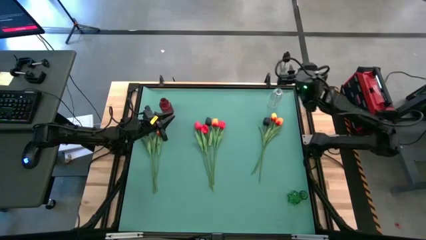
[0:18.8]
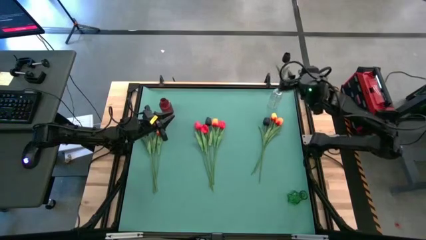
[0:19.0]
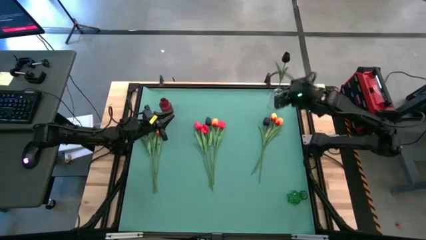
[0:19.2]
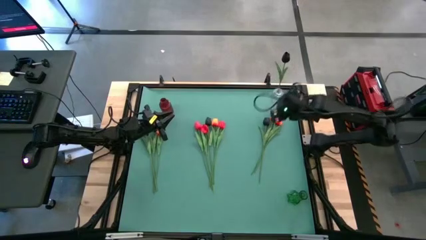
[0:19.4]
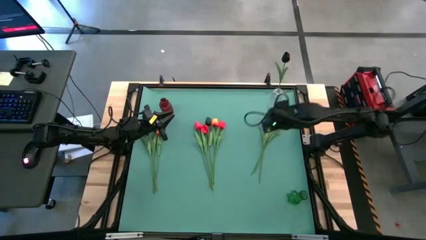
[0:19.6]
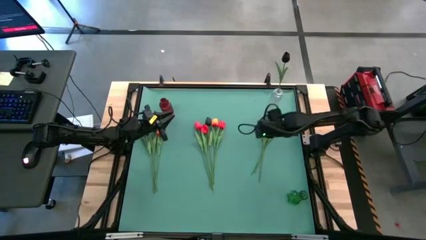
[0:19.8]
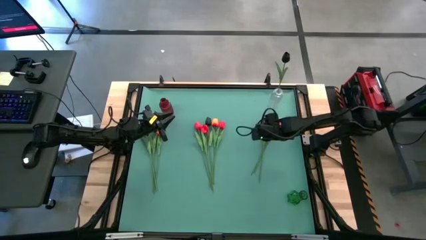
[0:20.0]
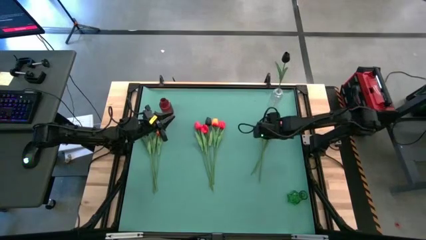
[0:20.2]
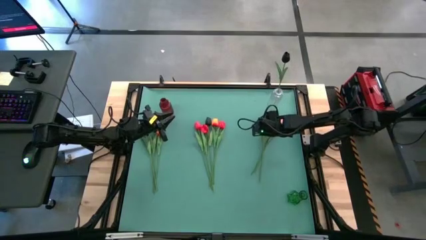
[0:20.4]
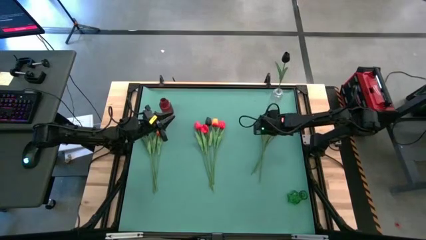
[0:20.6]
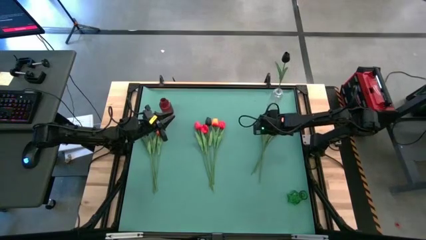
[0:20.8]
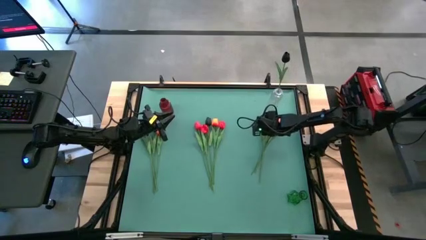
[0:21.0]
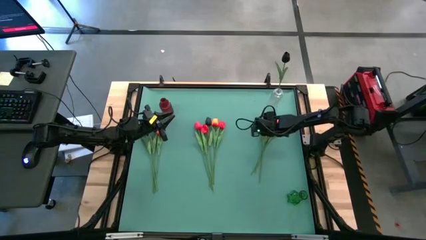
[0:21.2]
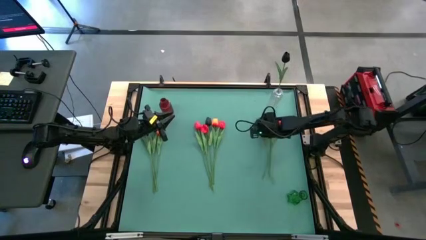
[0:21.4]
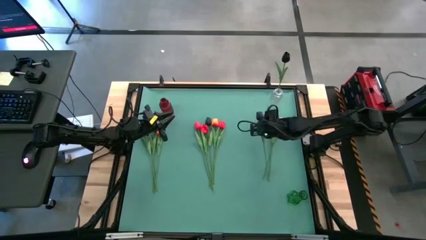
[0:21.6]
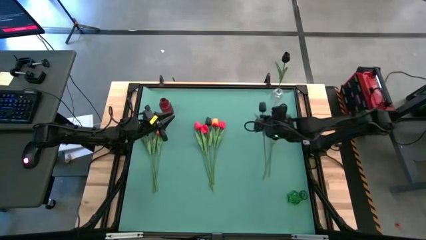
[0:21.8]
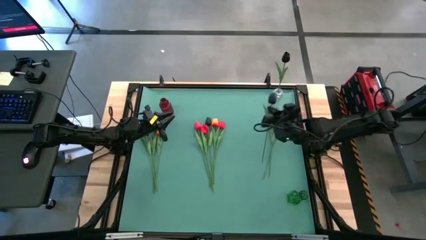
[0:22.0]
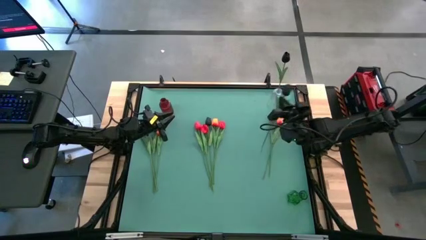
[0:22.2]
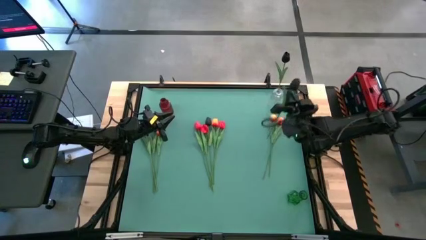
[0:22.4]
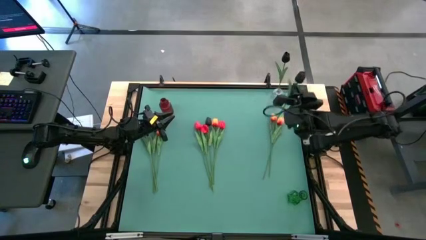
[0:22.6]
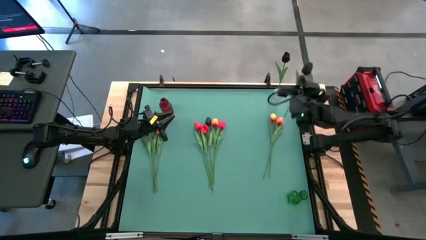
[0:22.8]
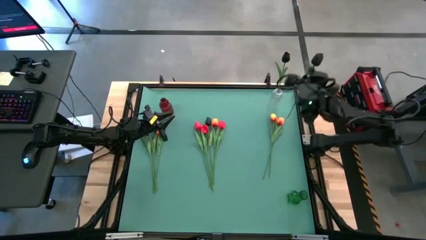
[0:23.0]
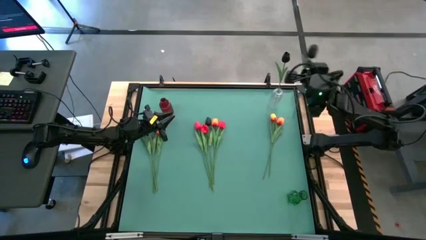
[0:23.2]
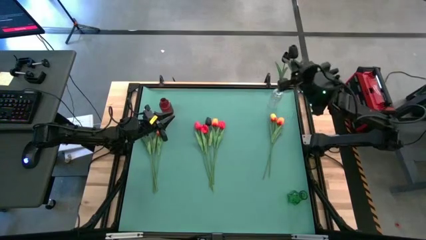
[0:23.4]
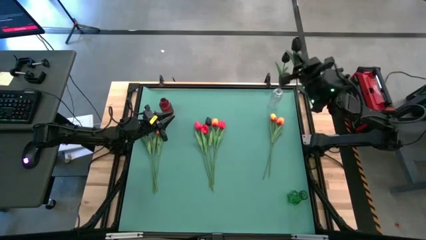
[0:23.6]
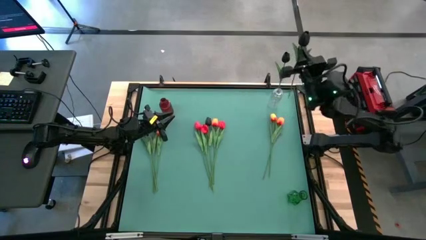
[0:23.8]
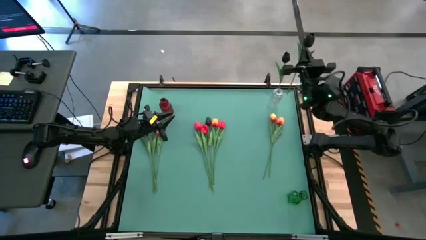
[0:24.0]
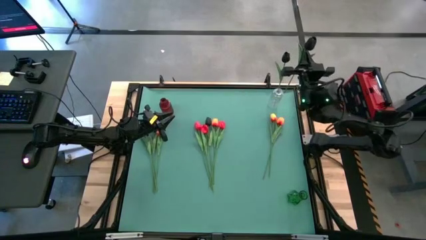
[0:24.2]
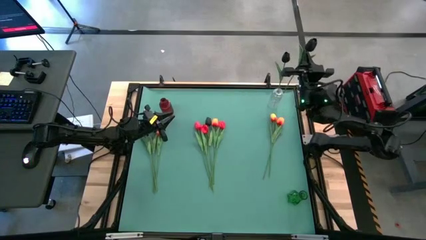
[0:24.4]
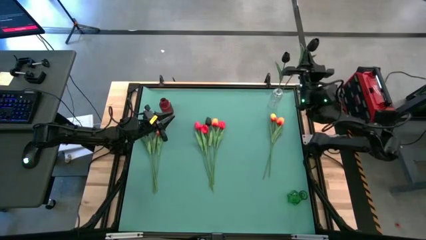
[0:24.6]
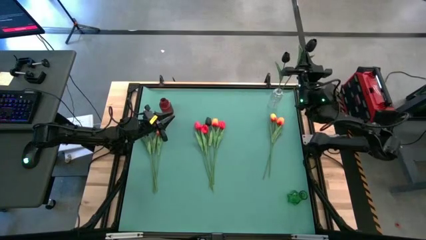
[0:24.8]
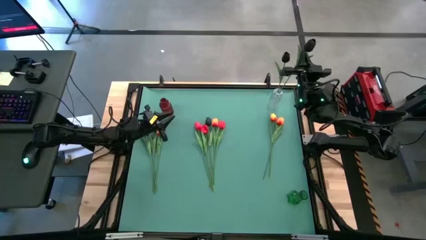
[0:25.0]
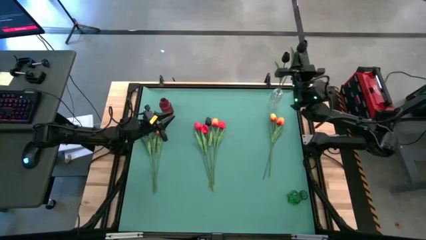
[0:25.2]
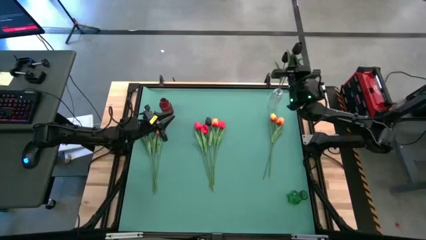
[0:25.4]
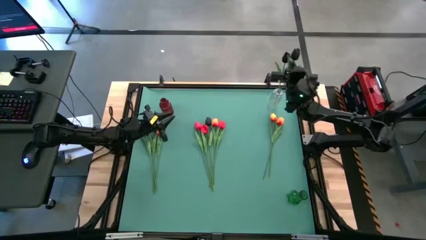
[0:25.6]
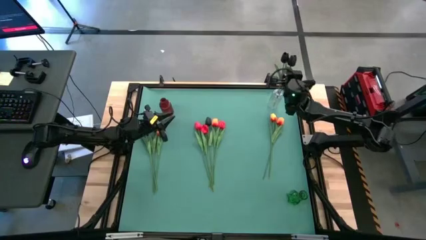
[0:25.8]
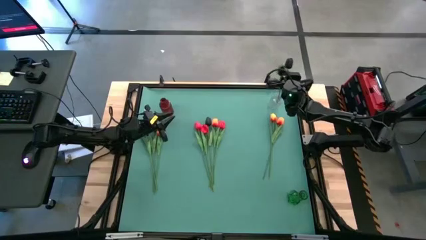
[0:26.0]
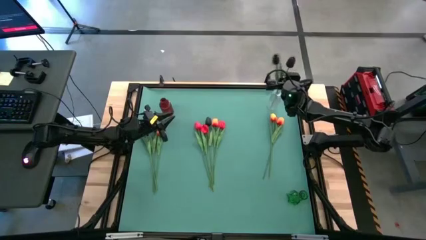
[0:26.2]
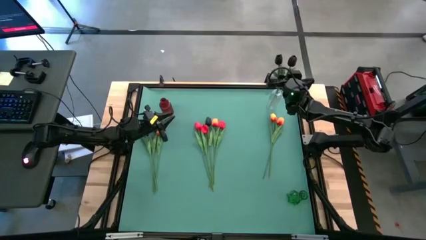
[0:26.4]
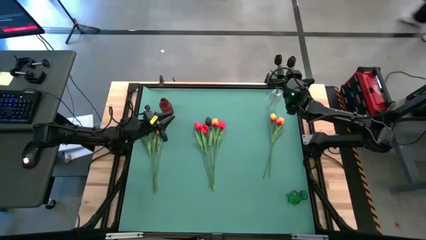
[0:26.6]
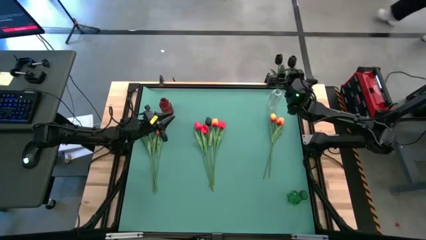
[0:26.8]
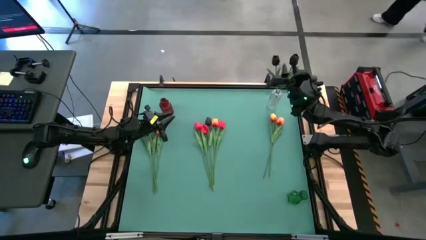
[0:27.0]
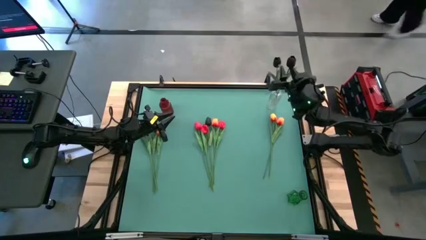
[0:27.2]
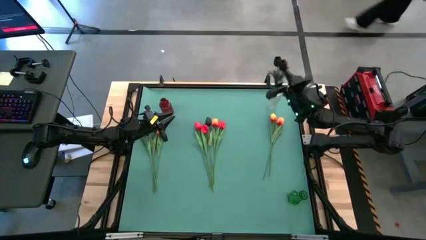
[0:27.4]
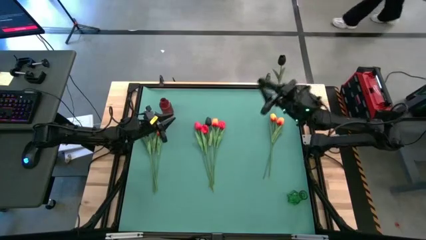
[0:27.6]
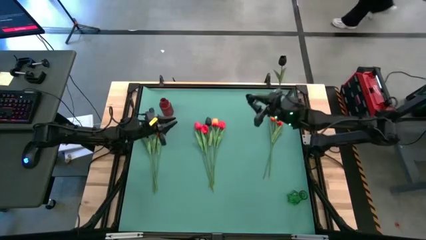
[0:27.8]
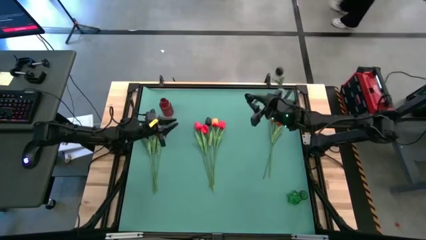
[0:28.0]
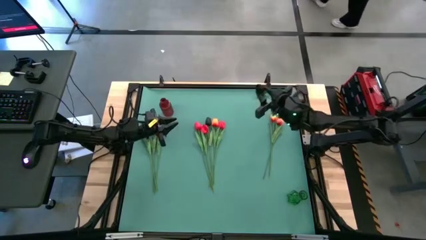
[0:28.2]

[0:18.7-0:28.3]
Task: Sort flowers into vase by color
Put the black tulip into the transparent vase
